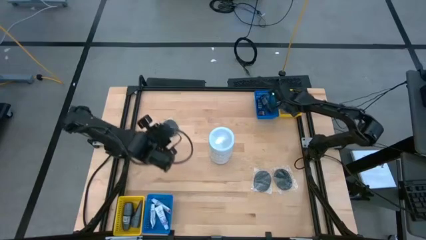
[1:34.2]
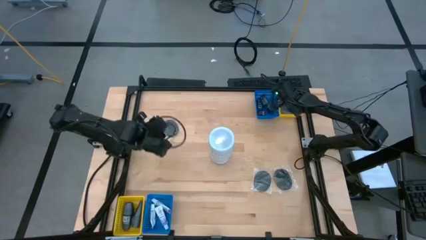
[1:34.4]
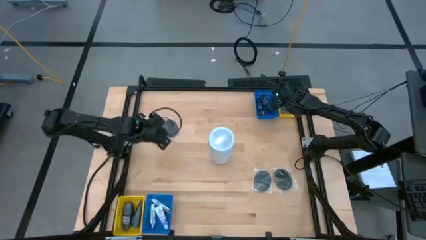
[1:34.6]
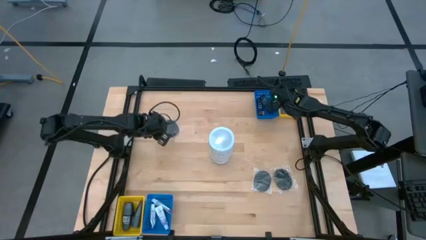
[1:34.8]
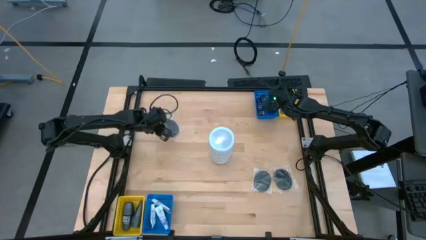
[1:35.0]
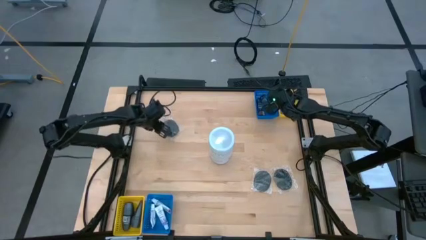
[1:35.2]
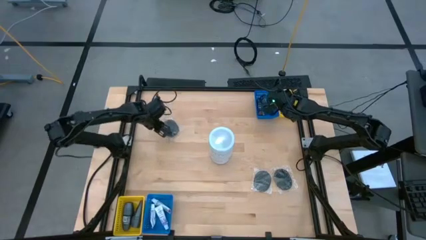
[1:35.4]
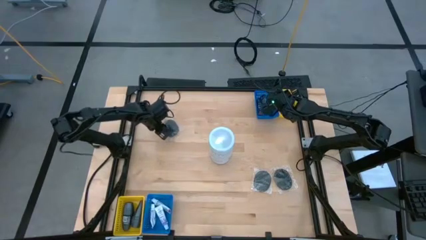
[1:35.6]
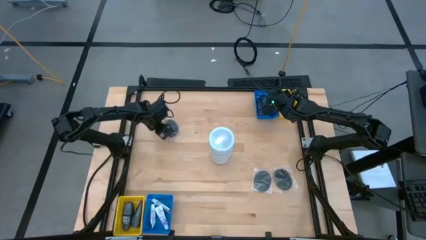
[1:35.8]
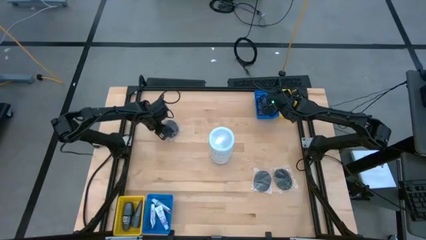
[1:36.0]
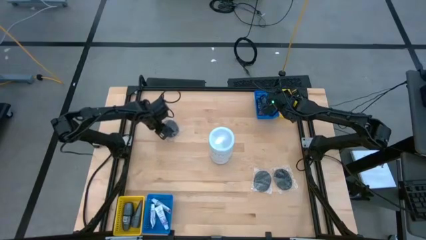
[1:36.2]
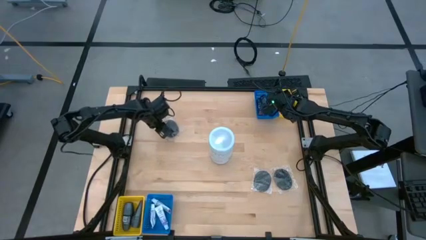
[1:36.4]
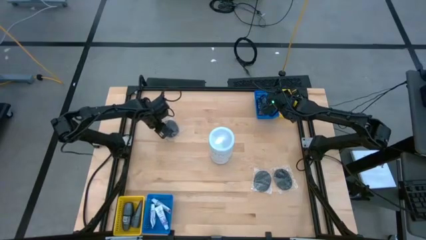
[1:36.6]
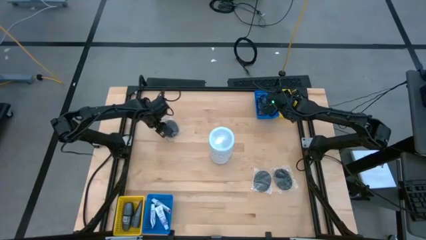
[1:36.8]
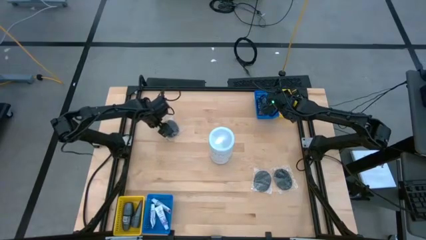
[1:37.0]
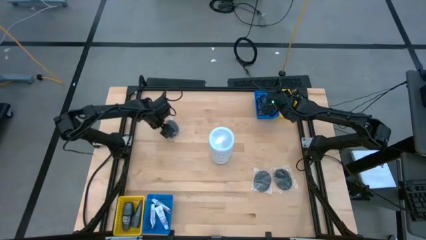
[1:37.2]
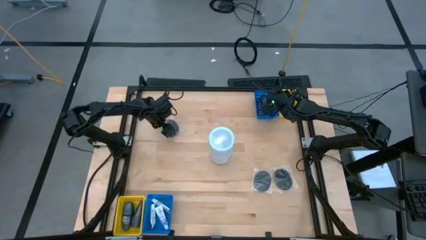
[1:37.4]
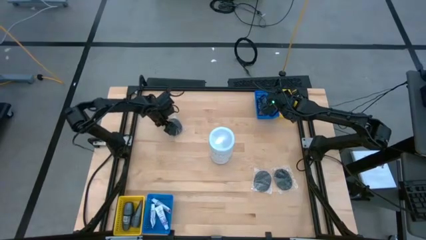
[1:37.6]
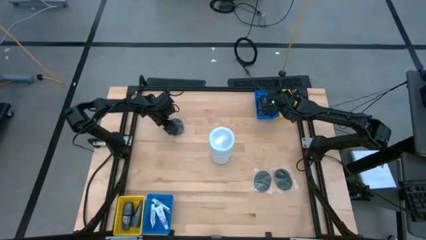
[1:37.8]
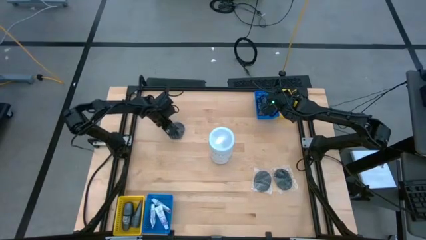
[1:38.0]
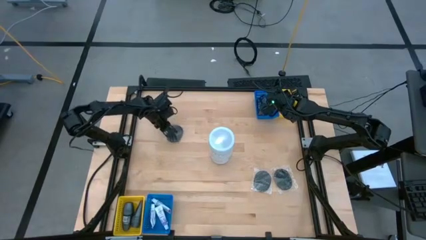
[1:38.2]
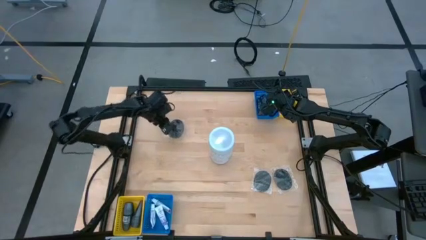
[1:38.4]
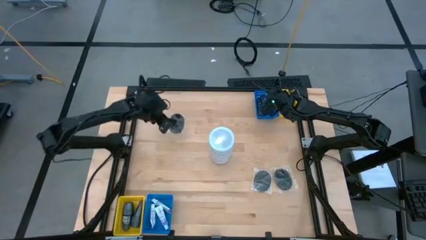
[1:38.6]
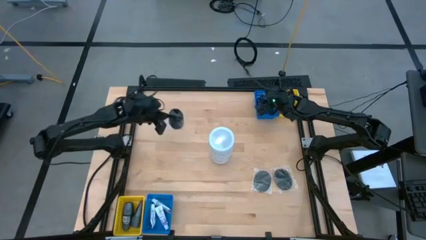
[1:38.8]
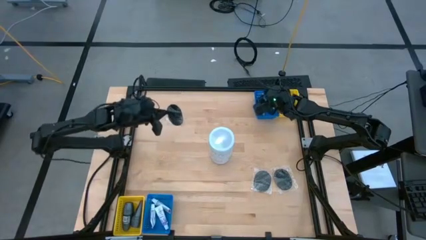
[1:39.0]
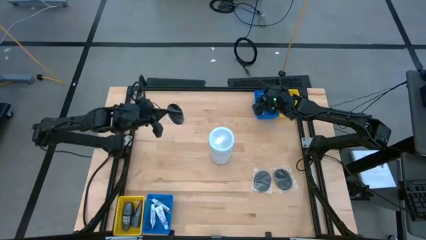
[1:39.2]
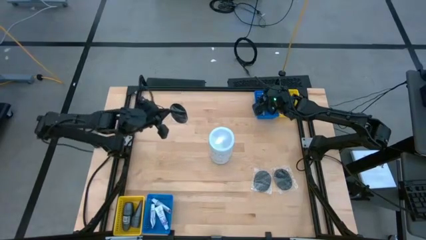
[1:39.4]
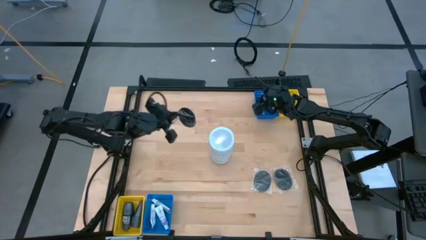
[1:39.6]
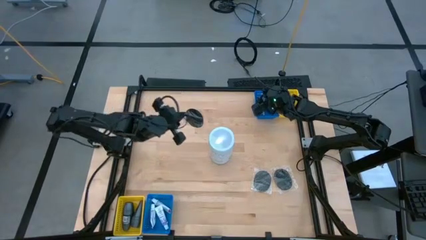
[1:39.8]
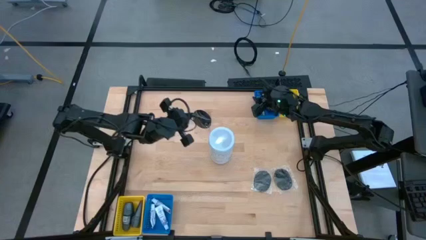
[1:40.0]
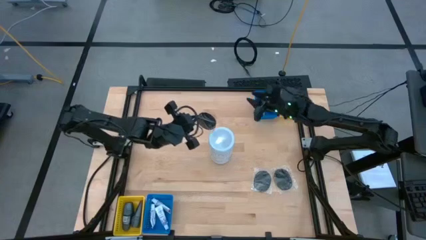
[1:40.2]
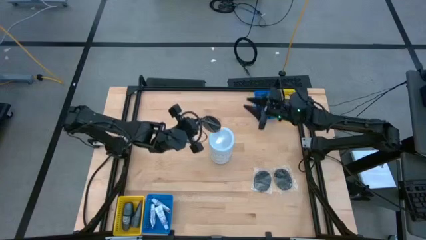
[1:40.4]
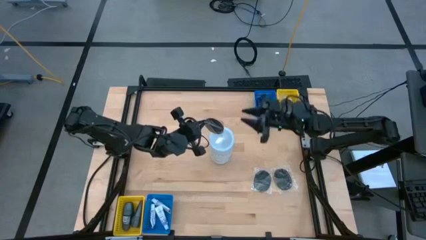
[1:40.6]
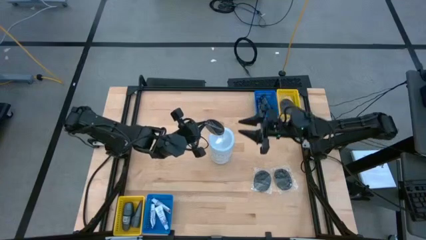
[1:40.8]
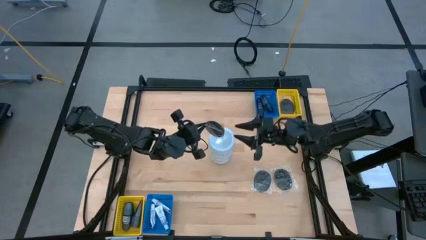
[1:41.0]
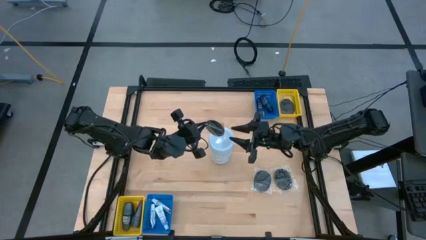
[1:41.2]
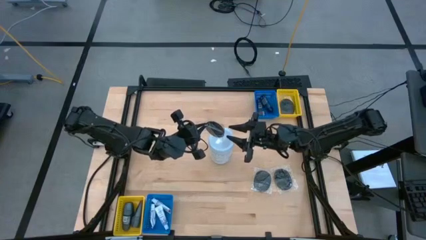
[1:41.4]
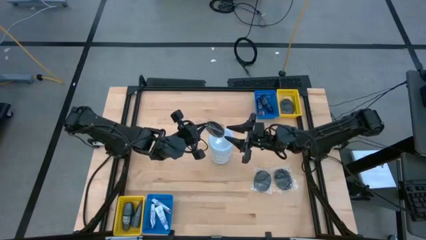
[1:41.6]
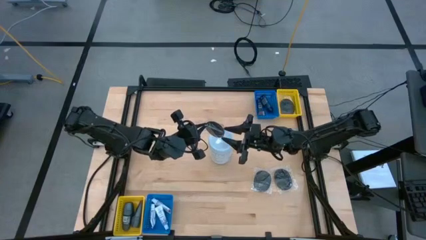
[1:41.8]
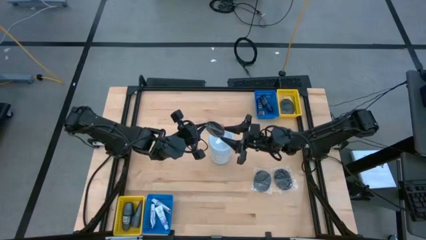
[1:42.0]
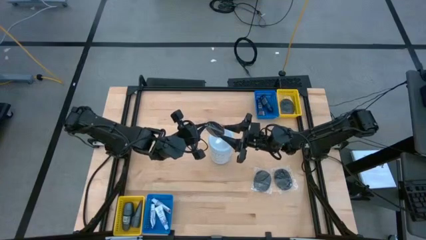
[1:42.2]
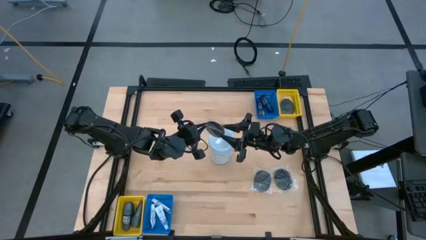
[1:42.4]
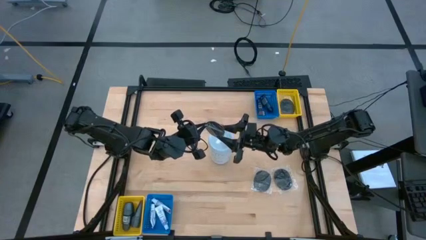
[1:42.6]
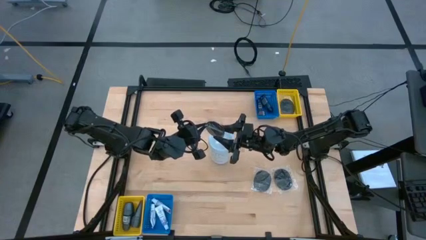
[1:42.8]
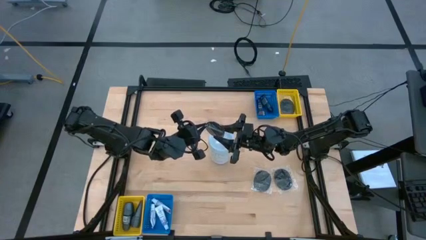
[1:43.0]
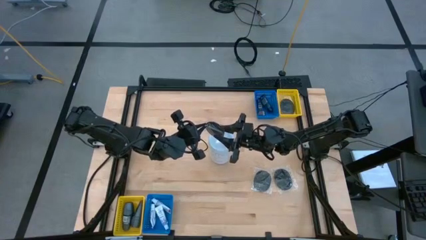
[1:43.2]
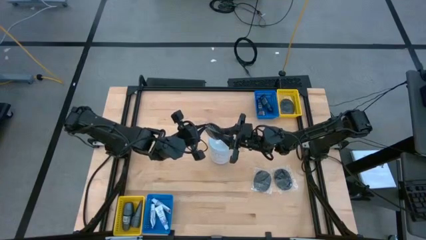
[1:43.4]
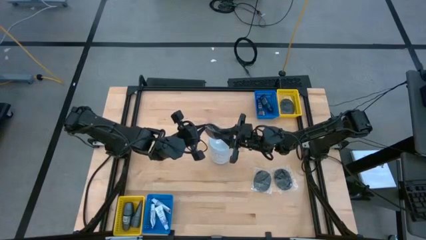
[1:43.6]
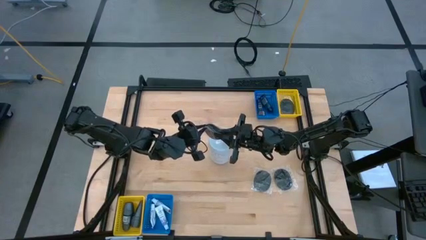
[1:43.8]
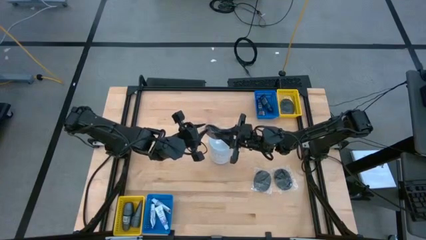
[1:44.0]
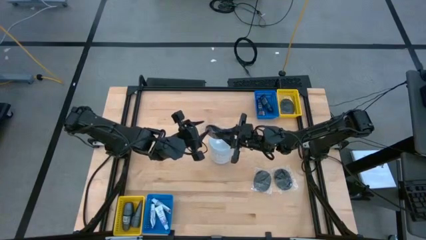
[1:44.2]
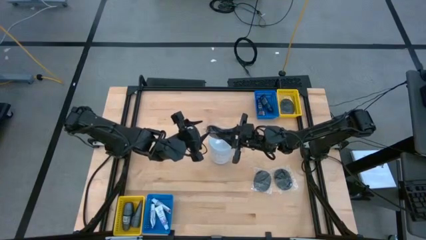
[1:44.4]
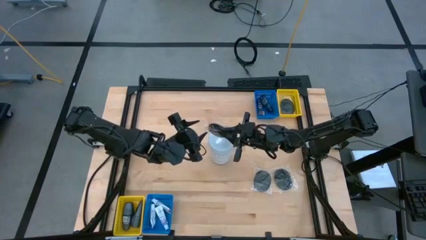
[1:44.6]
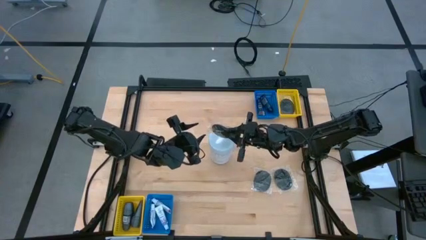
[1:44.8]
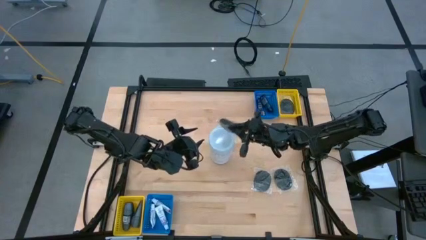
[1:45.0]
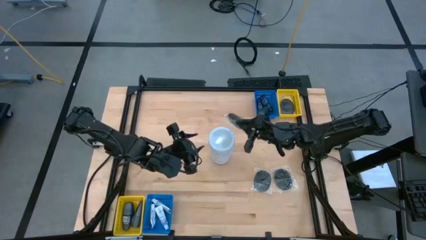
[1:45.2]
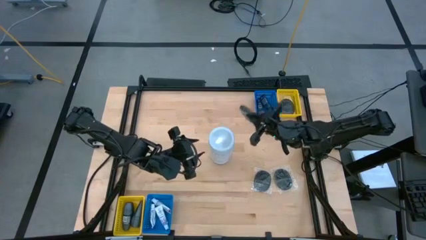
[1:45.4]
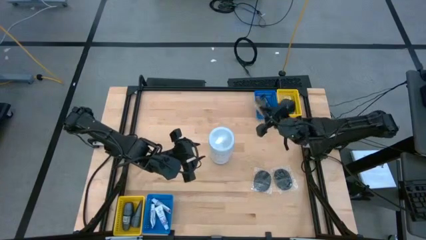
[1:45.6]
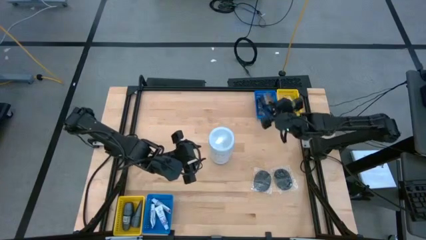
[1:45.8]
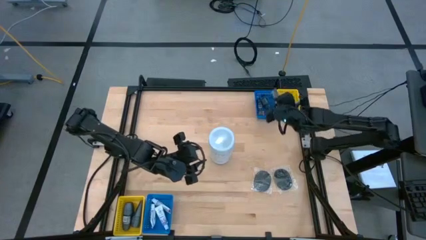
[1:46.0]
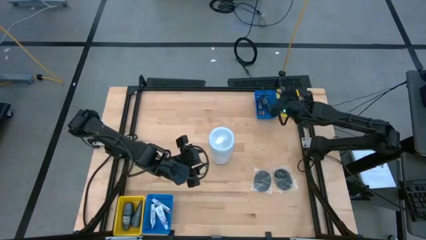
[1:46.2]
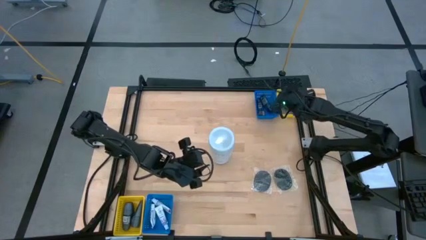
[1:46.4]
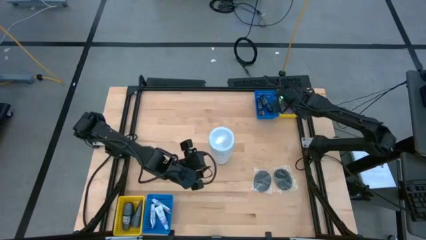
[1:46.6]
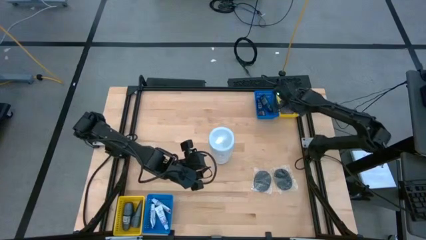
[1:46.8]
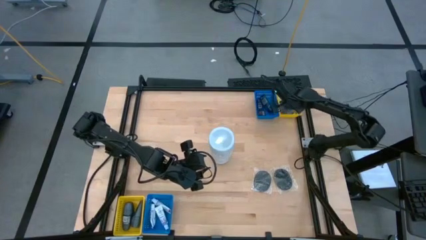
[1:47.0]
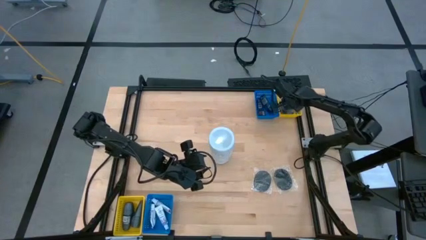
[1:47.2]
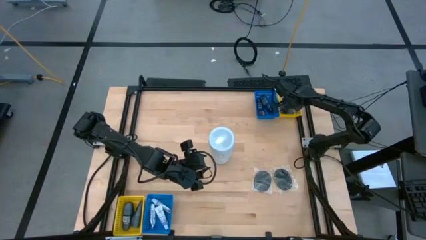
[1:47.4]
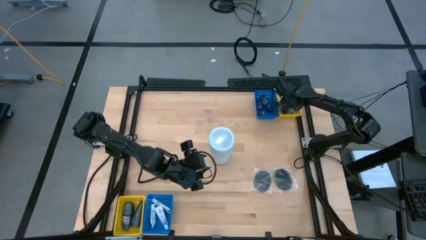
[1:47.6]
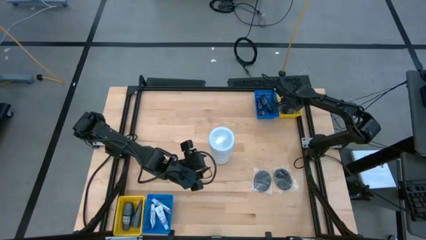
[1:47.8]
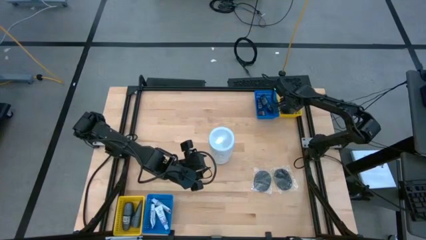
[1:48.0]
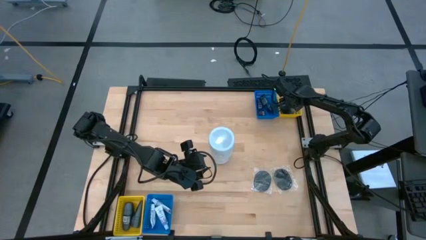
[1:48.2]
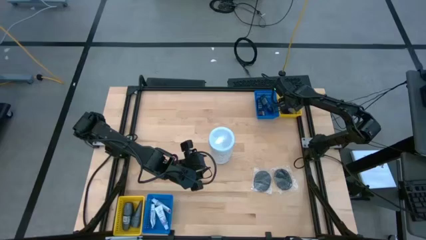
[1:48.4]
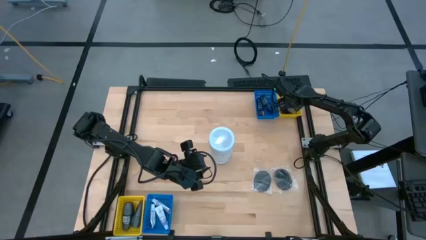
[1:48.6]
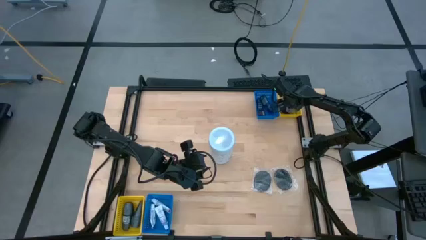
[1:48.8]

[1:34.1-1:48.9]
Task: Pick & Place Travel size toiletries
Put the black hairbrush into the top yellow bin

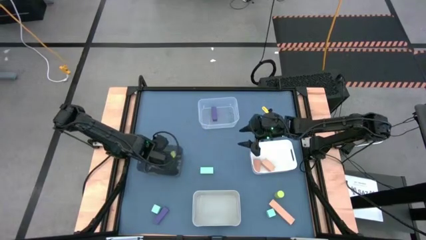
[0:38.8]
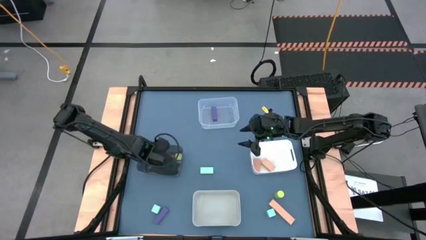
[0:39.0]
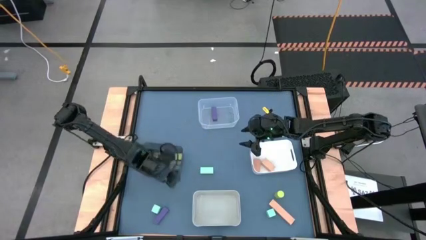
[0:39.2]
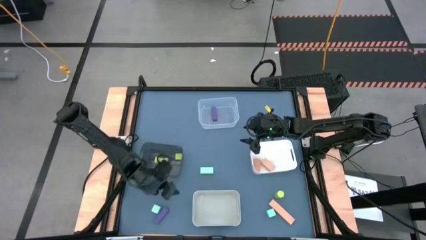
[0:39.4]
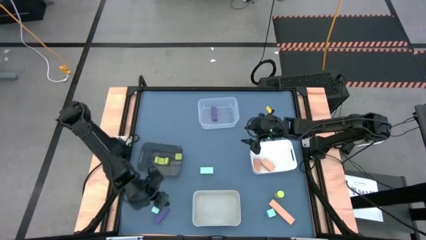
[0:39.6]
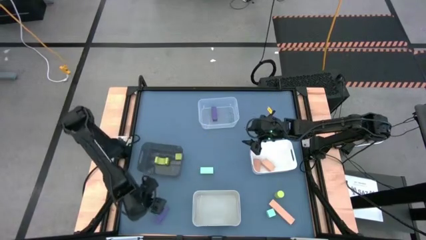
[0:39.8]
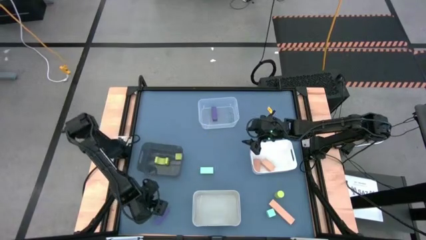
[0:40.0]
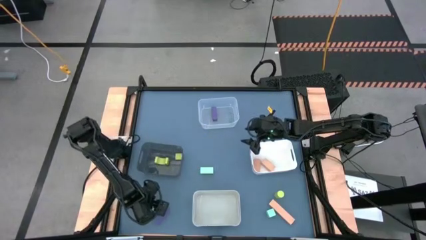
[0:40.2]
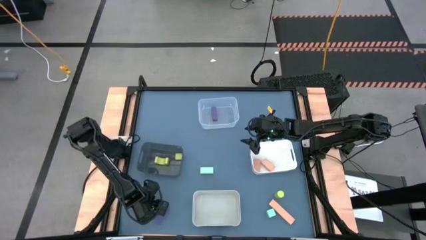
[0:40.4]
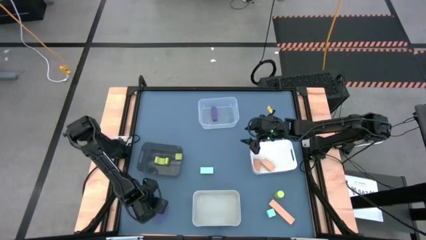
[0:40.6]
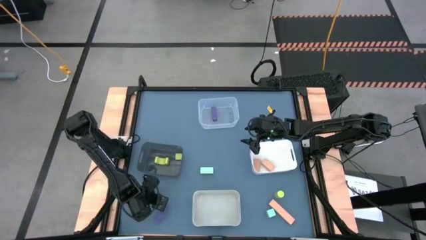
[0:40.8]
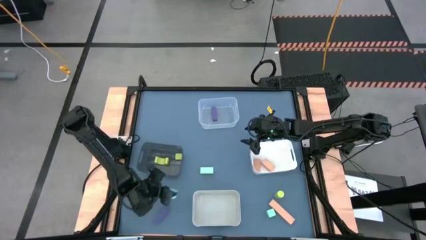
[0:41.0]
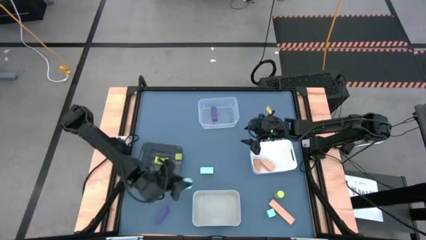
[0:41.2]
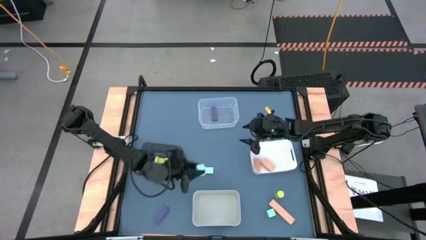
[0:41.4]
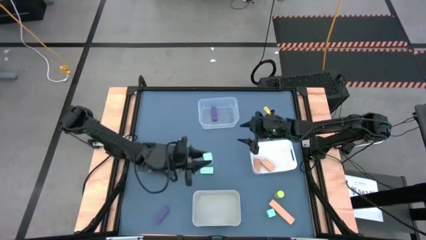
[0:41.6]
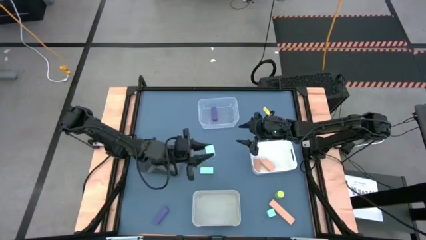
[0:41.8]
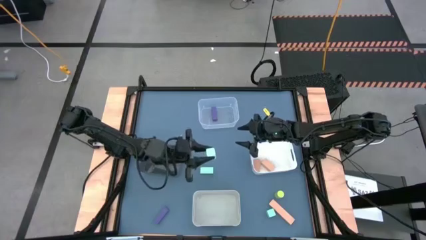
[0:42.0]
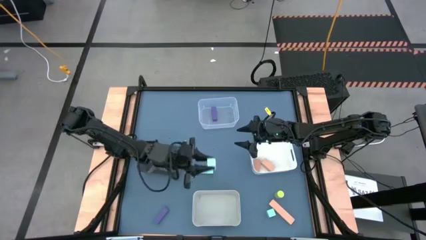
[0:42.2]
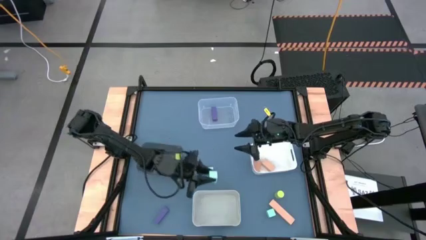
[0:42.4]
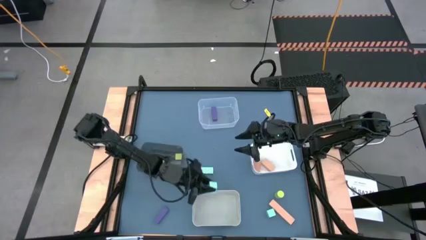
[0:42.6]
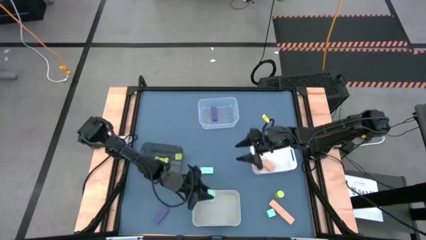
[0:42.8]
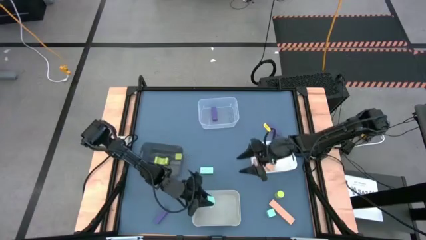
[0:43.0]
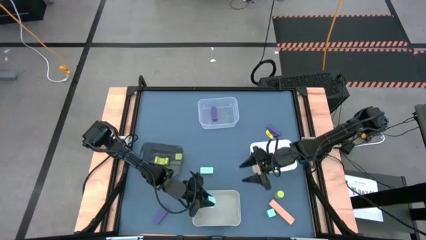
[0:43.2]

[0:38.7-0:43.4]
Task: Sort & place blocks by color
Put the bottom left light blue block into the gray bin
